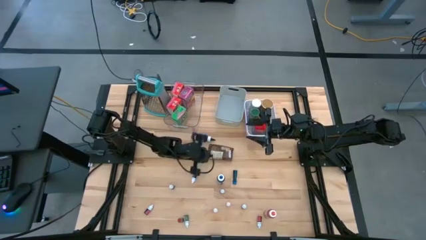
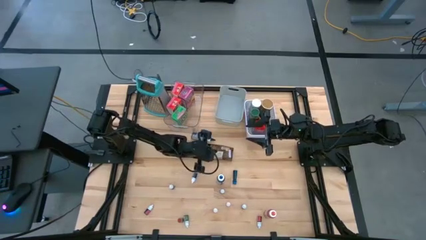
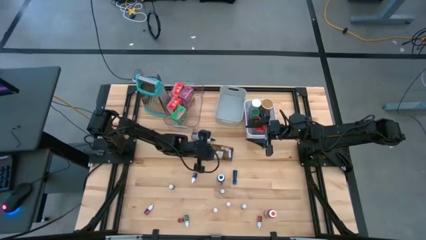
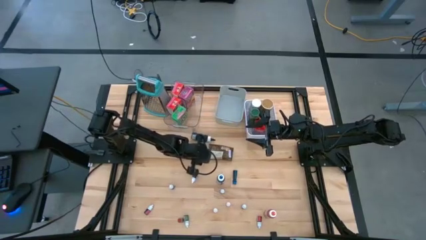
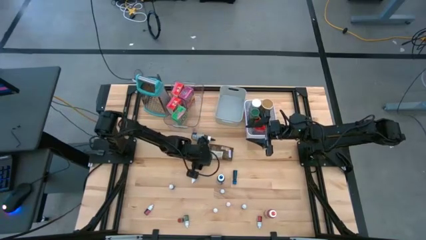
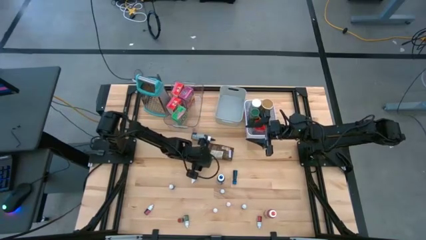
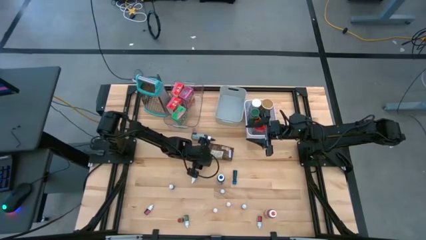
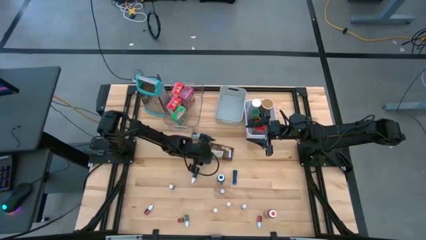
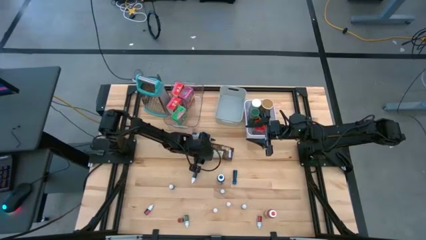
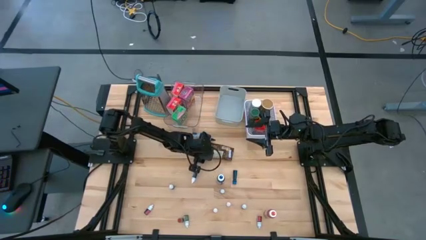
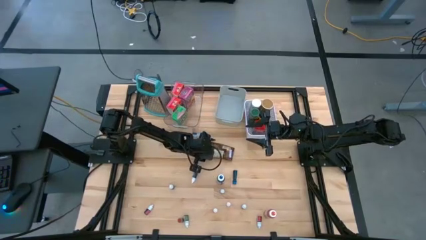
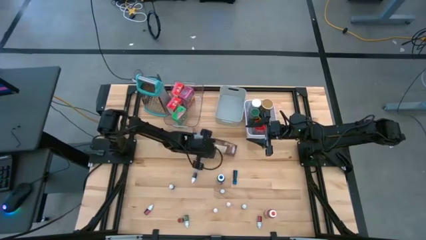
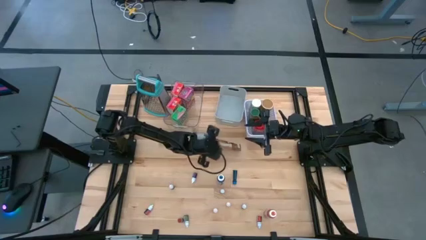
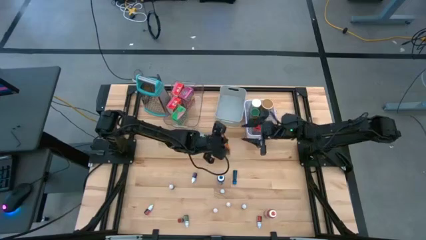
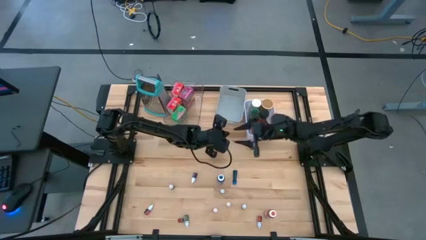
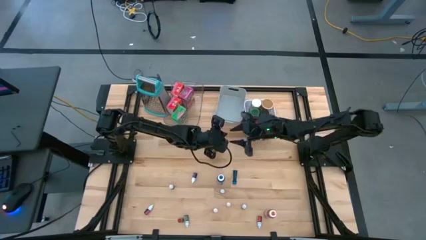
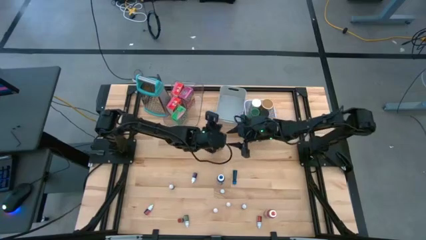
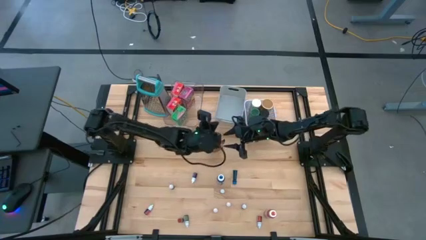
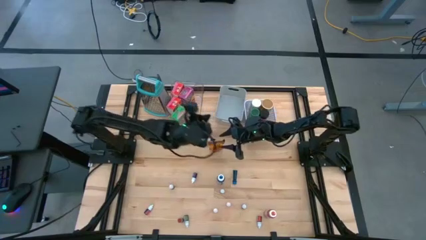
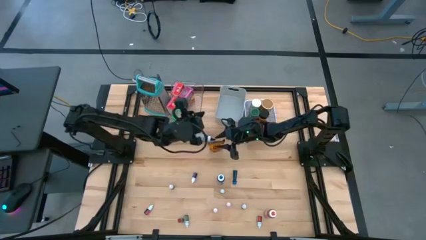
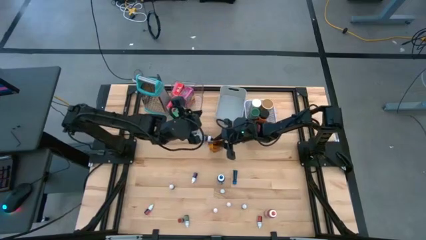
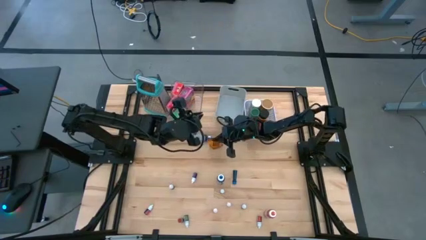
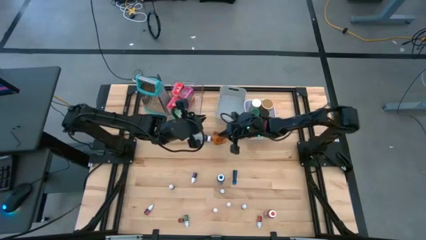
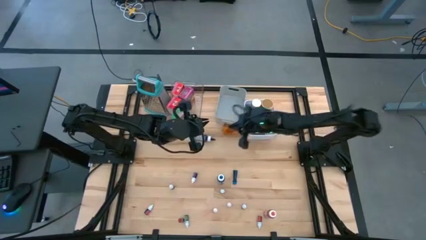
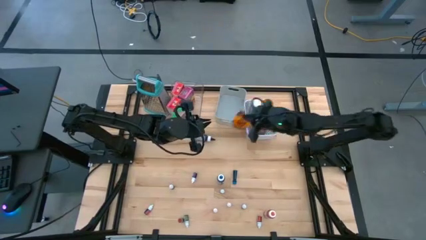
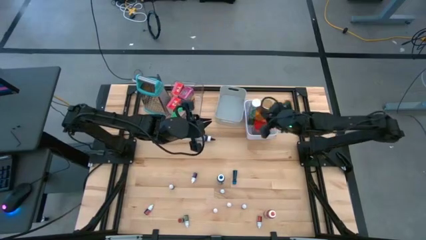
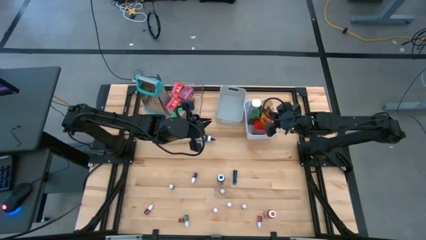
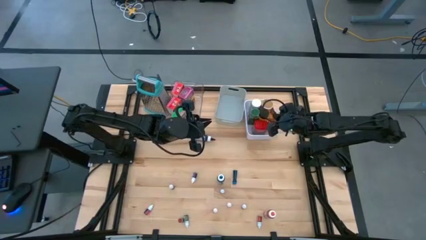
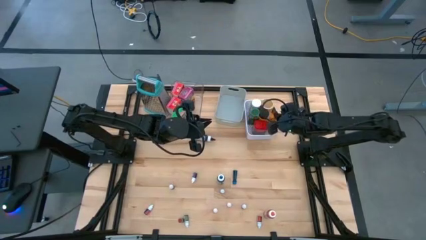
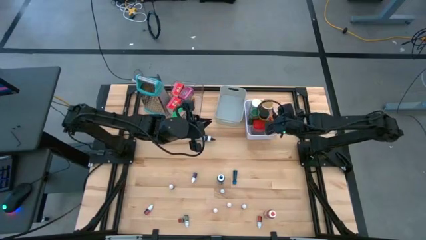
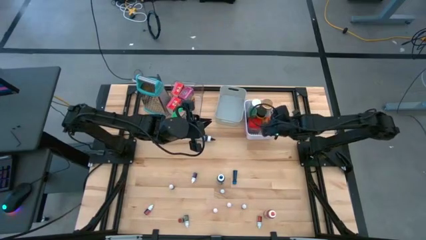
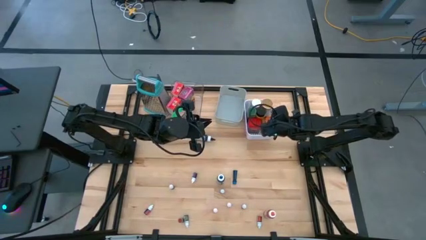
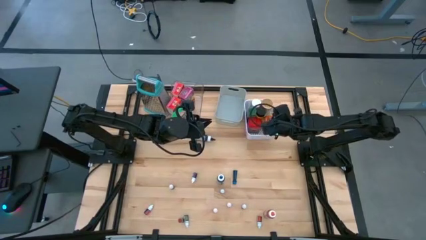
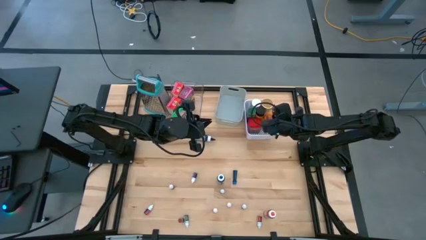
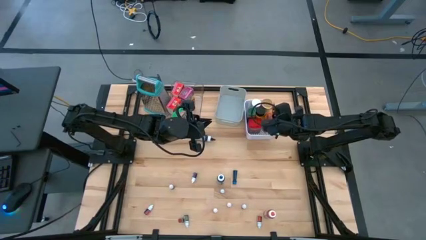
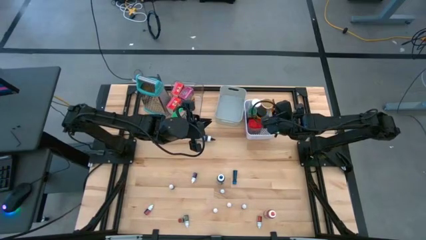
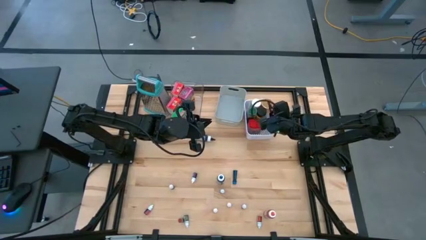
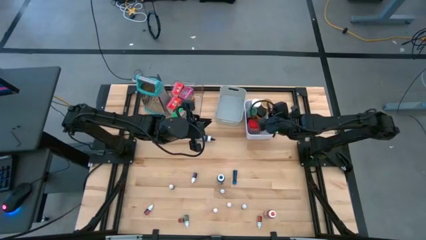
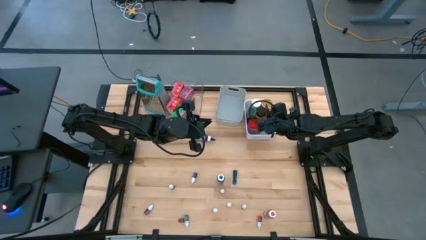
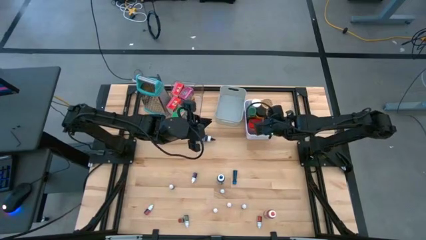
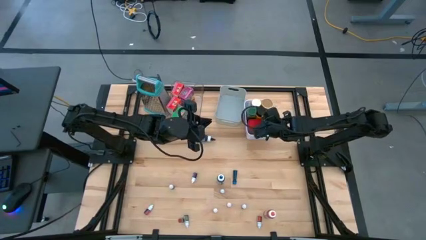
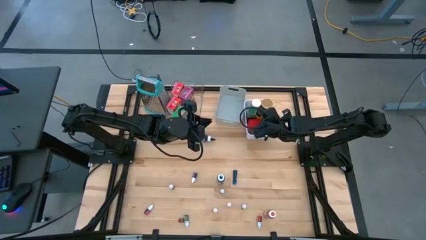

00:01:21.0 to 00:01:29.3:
Task: Pick & Place Kitchen Items
Put the orange spice pack into the white bin

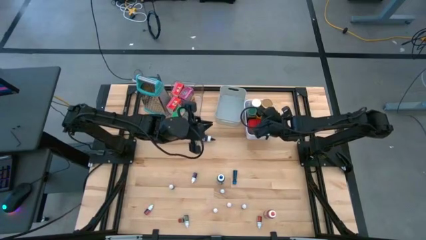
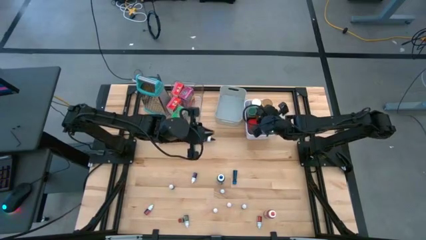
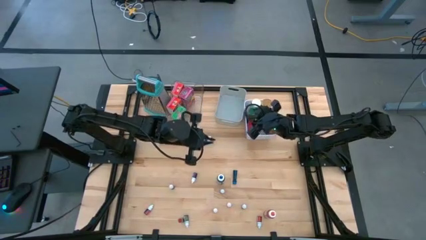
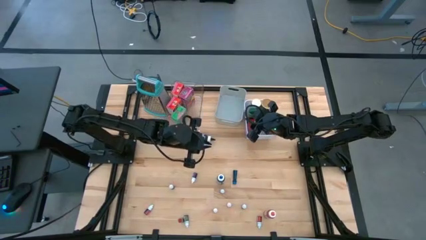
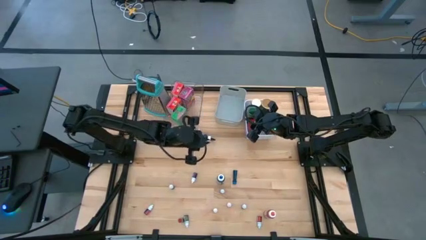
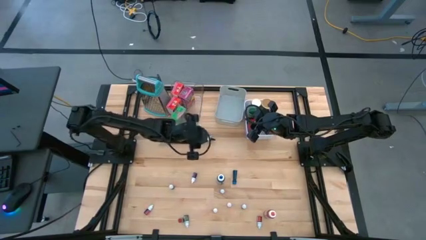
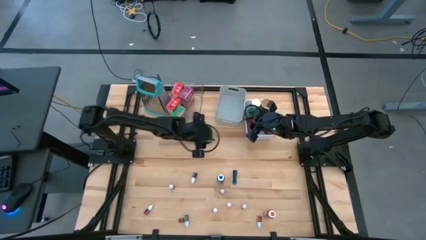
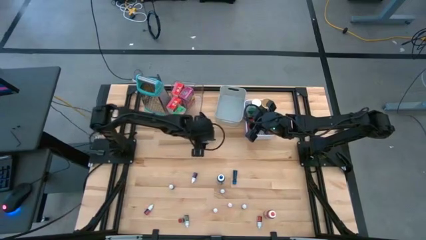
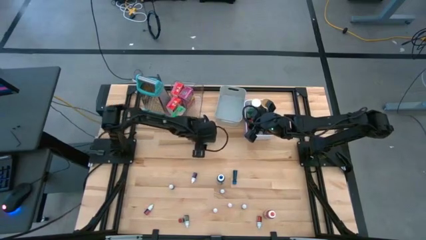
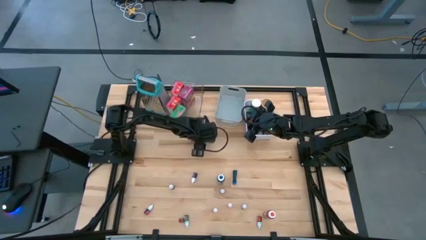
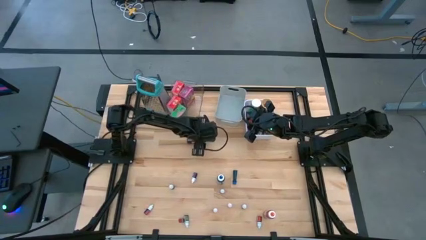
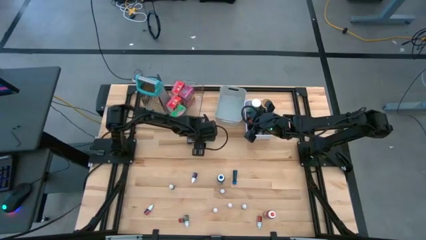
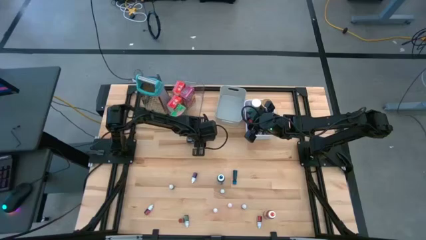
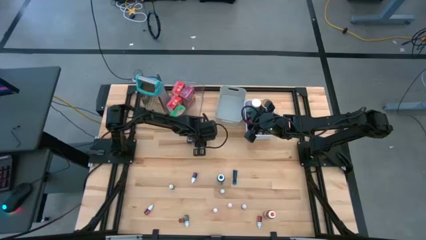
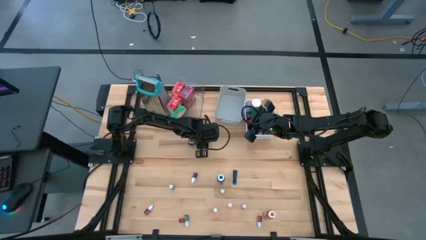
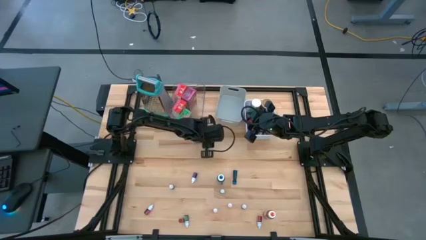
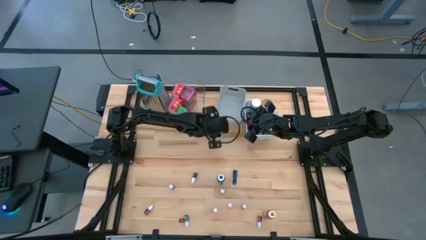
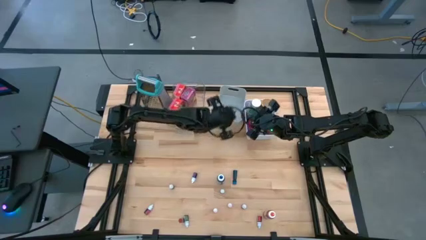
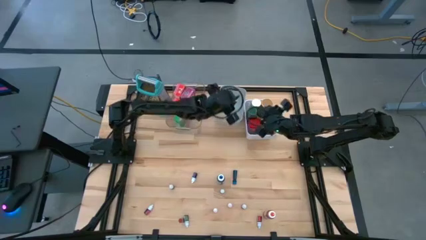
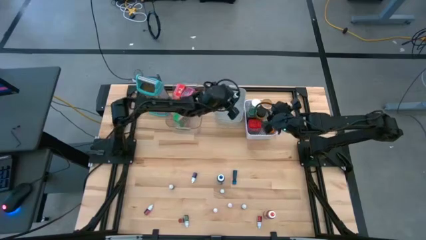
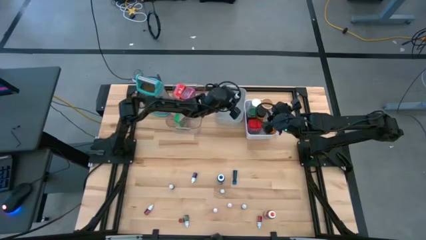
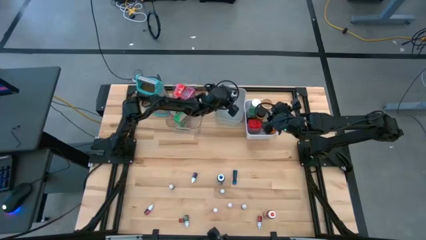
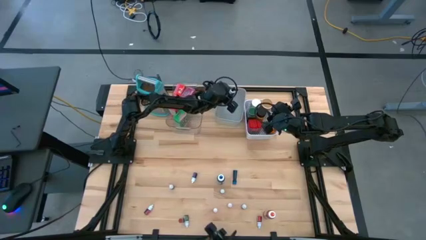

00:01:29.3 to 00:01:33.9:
Put the large black food coloring bottle into the gray bin

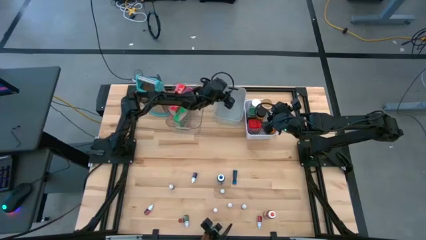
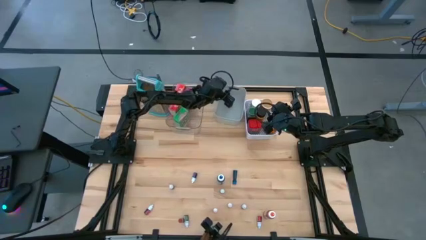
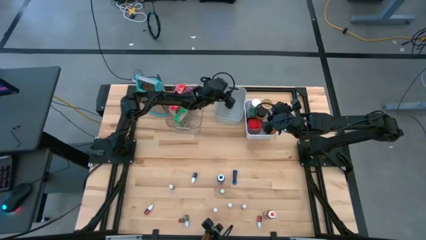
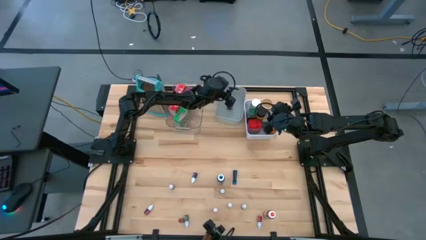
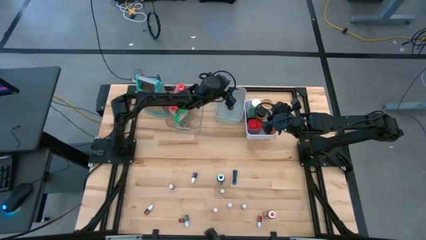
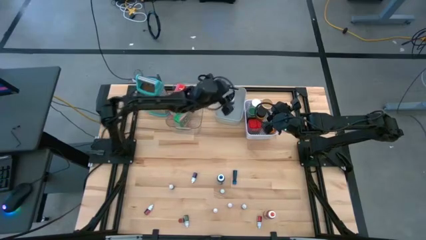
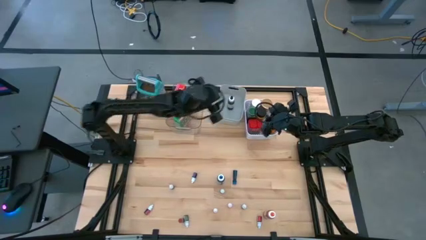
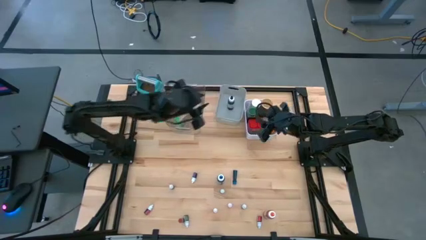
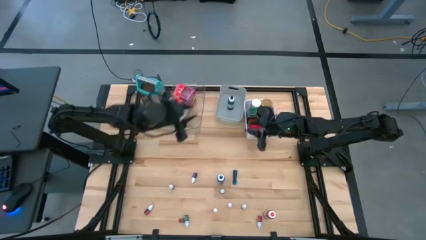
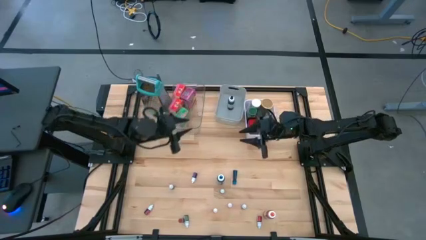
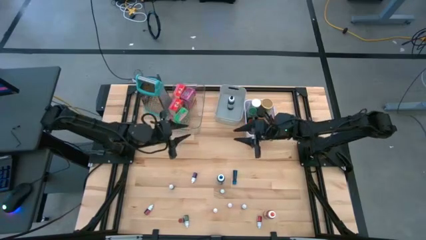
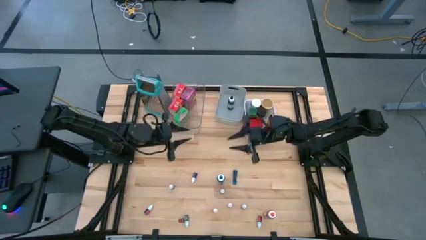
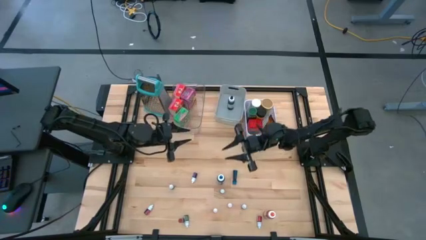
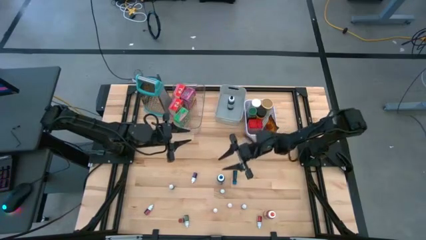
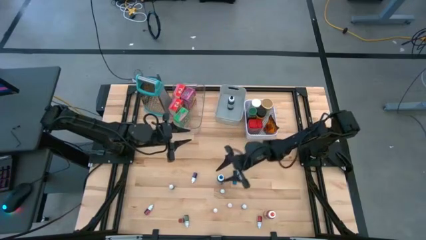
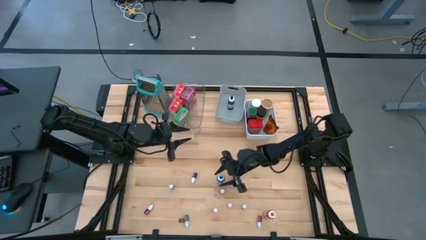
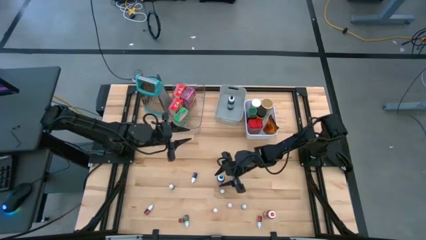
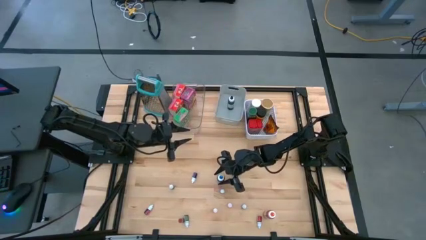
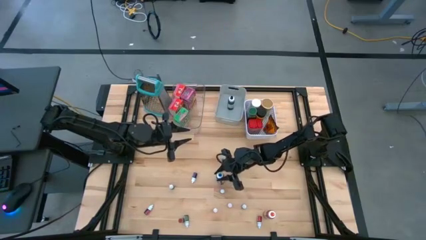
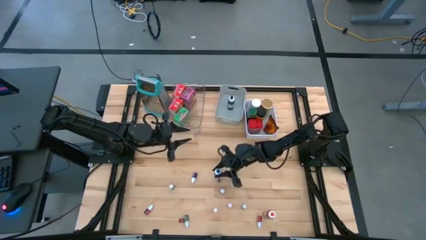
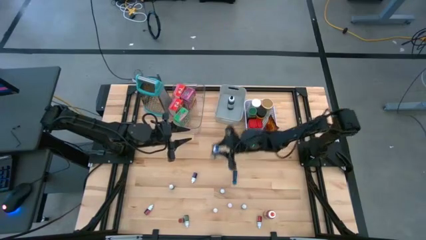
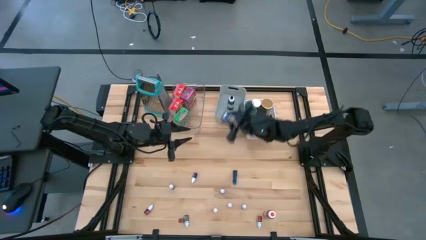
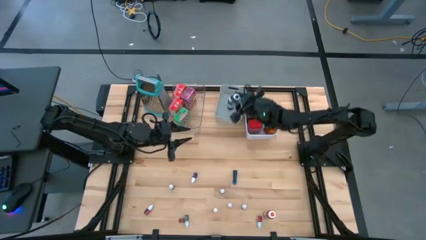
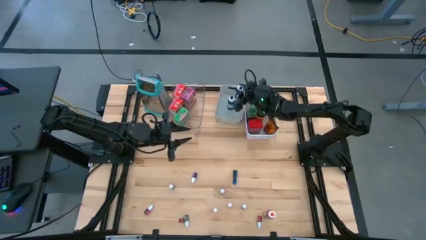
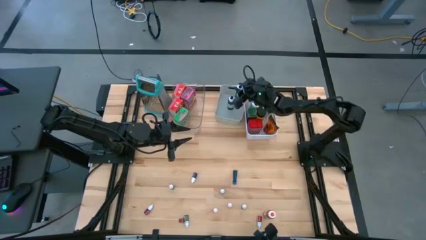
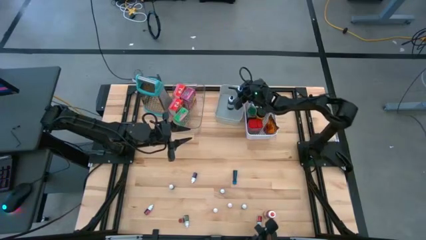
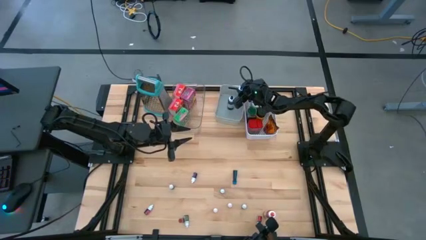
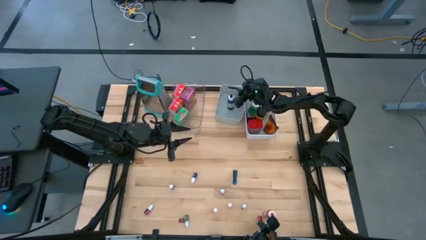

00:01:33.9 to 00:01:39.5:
Put the large blue food coloring bottle into the gray bin
